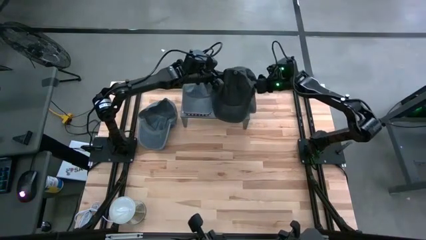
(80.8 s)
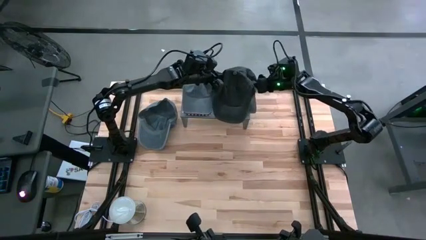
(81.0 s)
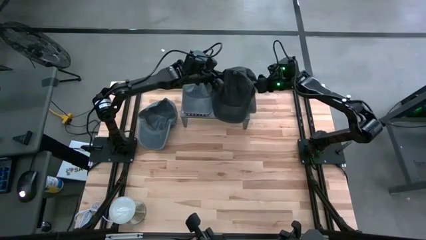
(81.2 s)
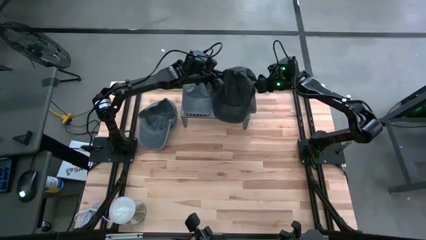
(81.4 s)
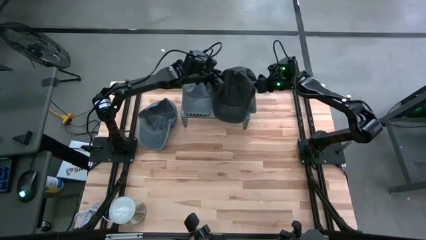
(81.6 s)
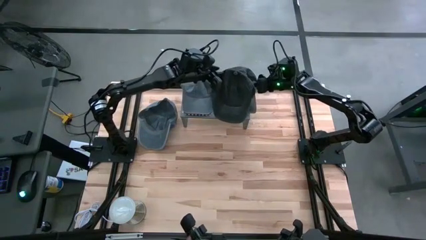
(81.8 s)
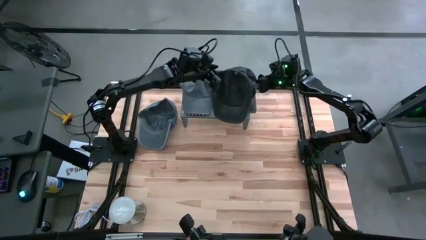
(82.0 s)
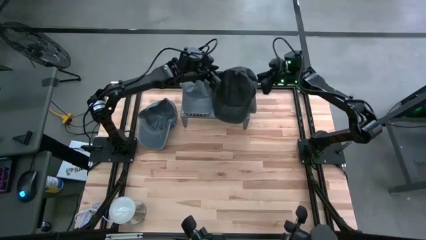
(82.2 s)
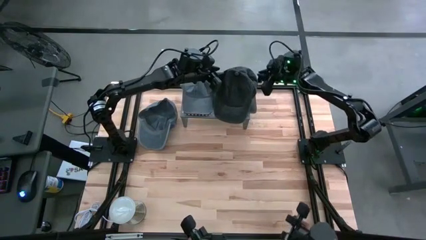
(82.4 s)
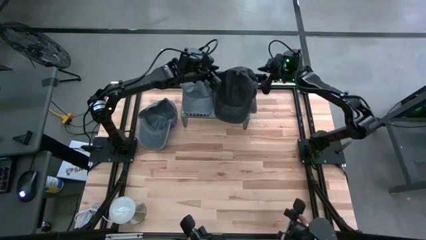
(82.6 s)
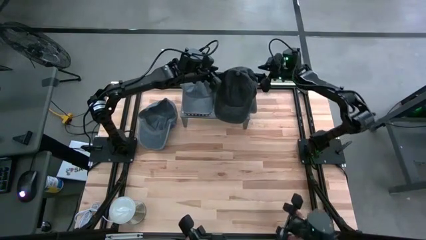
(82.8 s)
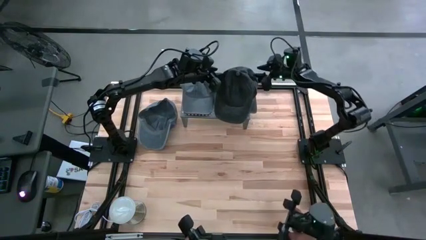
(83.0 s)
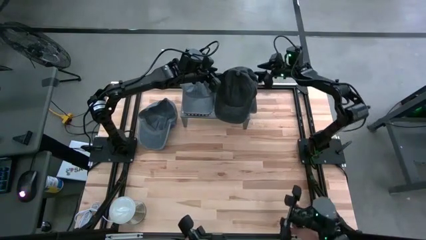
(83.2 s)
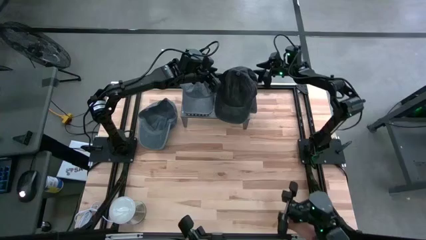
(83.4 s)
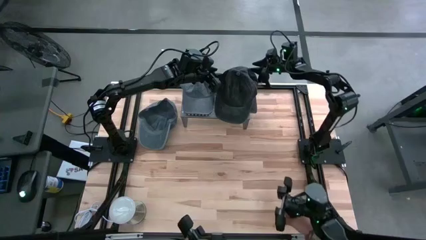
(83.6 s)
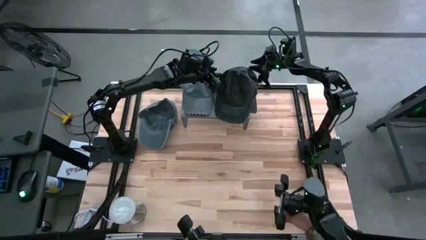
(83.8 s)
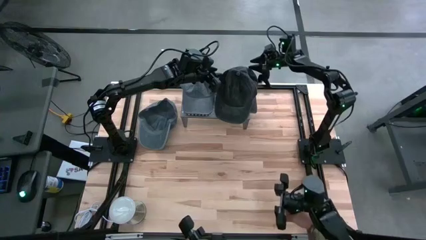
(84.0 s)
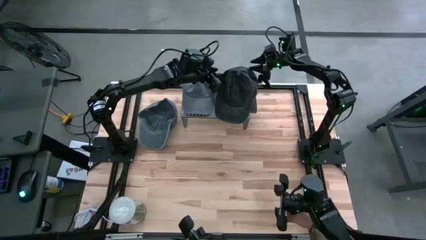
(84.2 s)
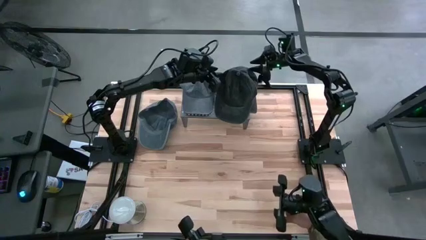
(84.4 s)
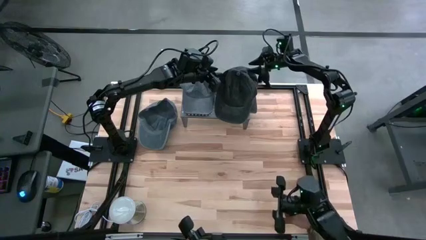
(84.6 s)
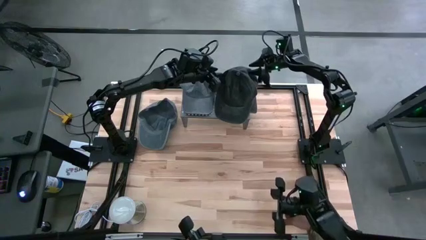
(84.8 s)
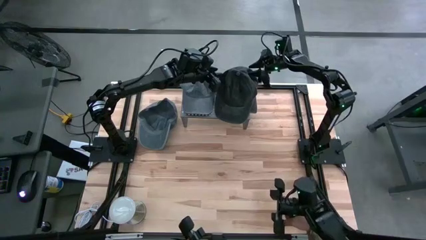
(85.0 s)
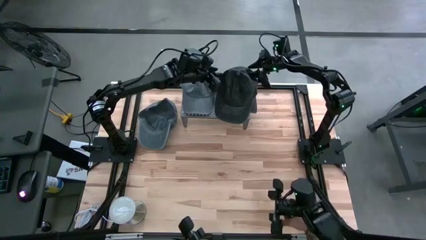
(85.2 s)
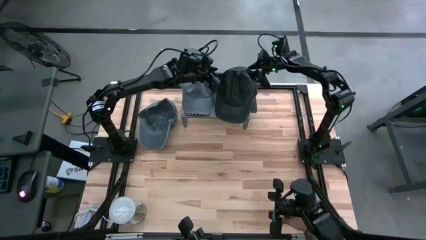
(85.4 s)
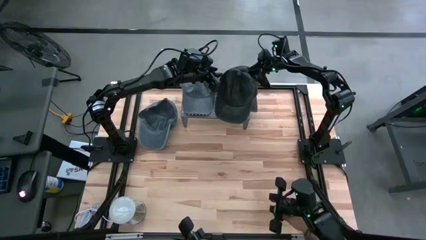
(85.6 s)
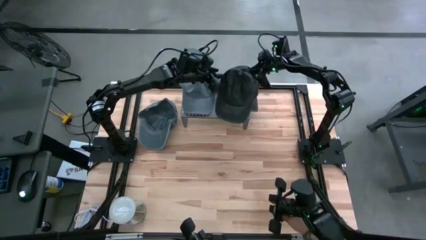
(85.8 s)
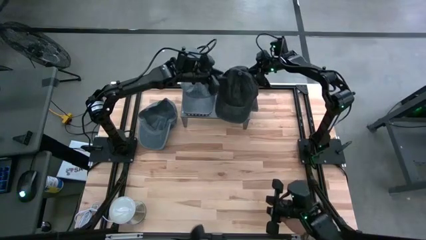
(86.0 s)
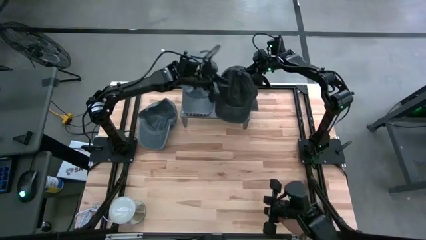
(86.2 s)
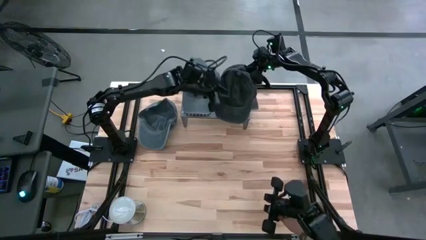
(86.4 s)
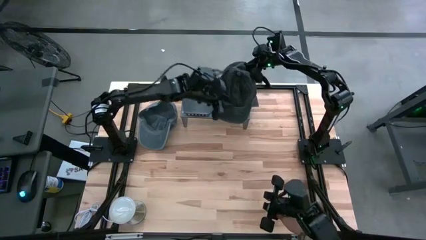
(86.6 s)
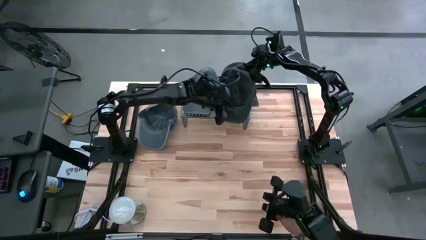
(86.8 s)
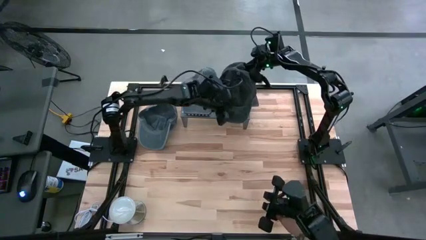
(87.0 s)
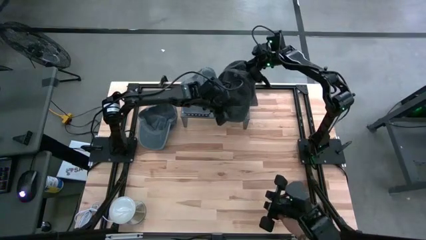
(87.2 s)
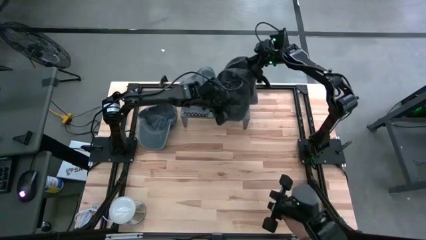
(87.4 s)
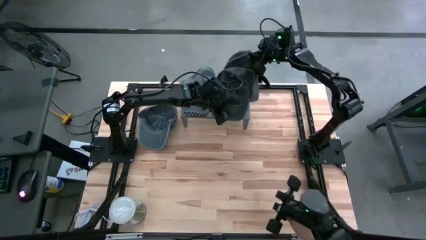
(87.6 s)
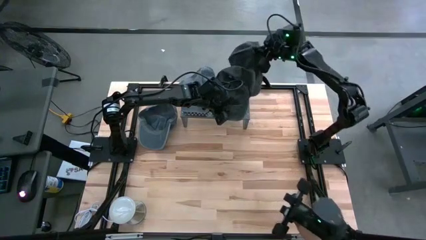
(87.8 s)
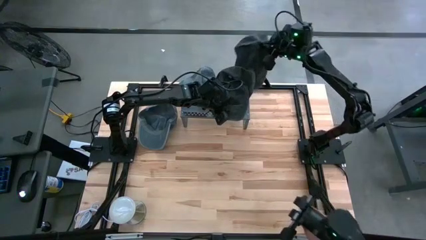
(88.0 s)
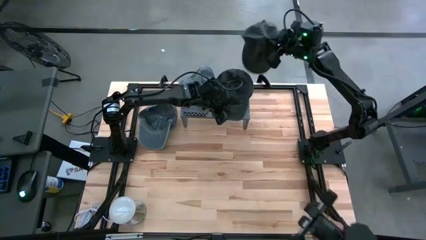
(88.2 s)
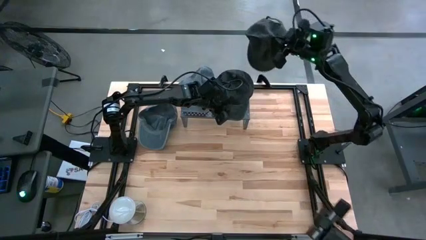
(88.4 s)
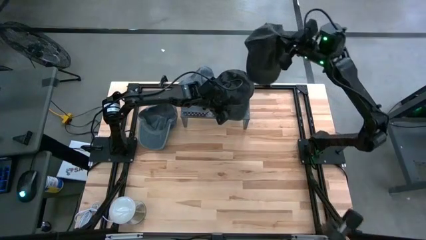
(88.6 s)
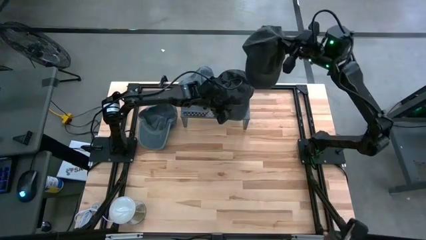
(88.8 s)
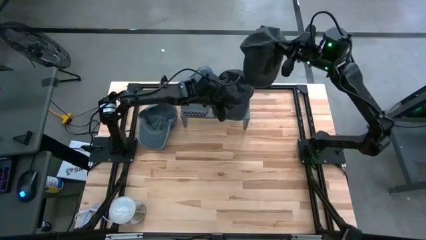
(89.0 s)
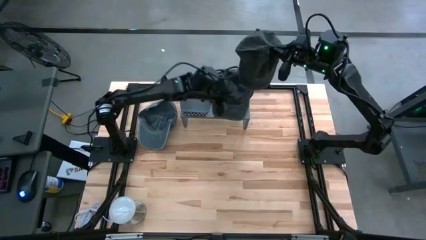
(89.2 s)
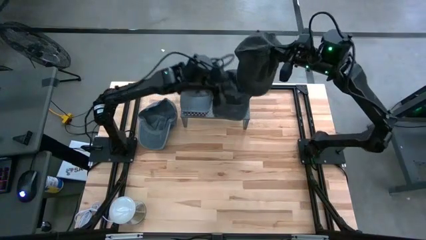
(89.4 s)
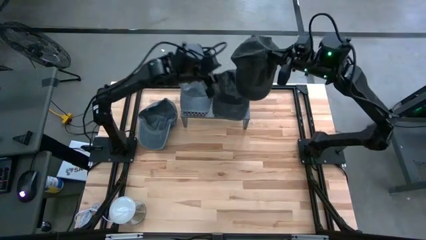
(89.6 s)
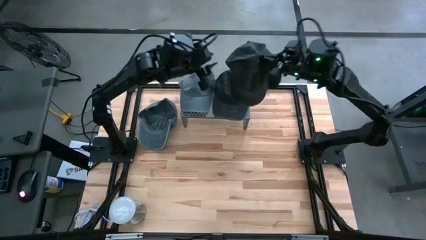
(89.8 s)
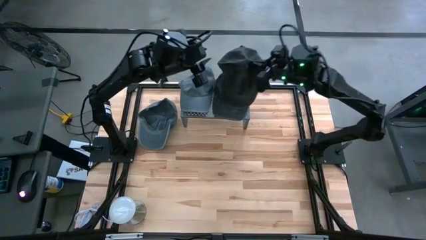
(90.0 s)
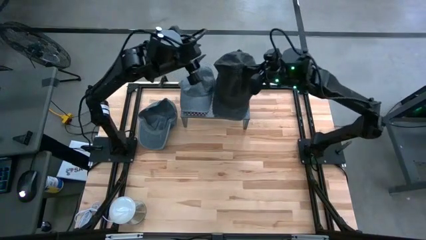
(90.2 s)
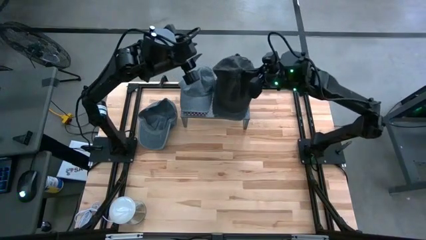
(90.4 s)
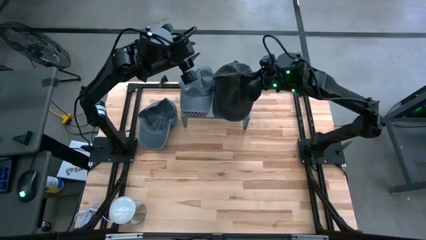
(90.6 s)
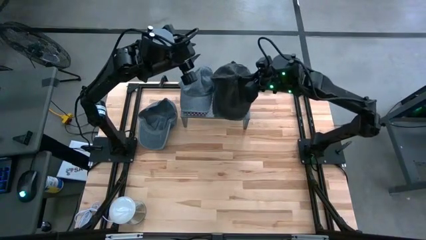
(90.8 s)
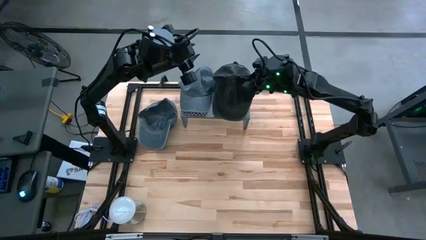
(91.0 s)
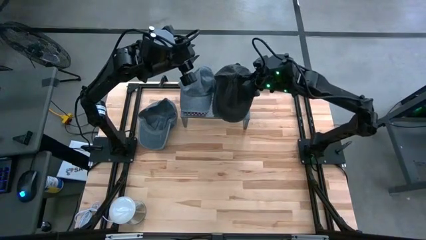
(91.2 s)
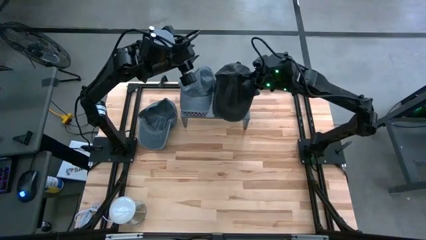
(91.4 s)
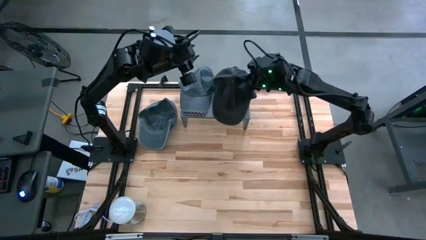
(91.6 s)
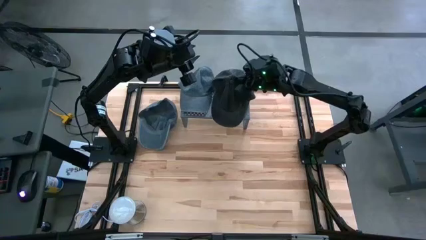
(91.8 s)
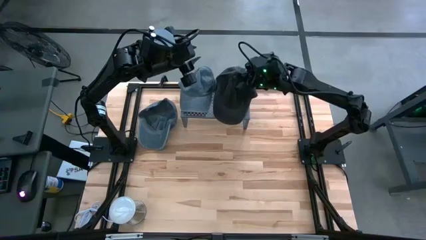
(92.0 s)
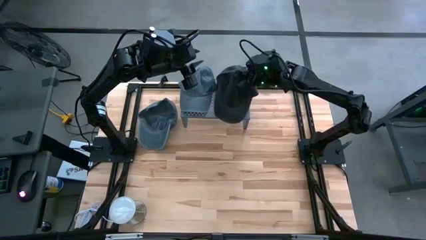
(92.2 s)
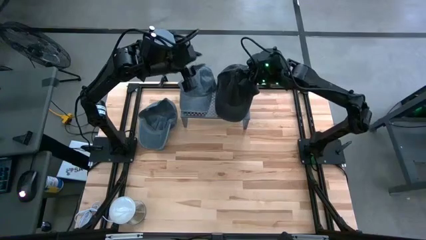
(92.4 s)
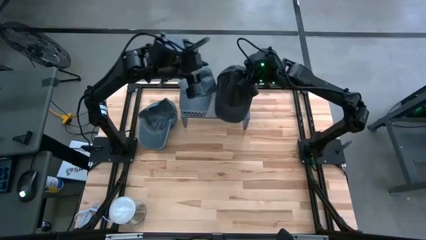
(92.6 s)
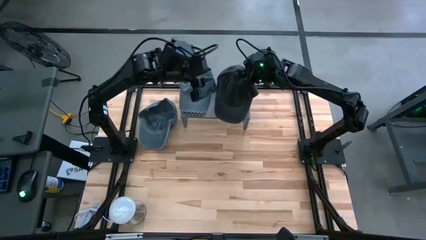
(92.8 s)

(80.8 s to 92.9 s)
Task: Pick & Place hat
Adjust the black cap on the shelf

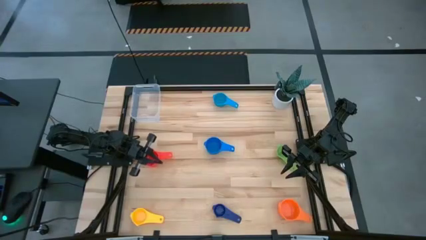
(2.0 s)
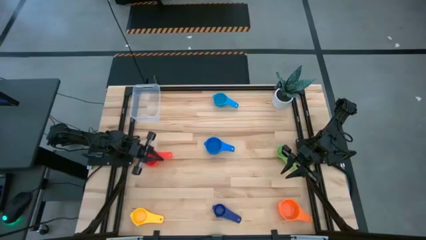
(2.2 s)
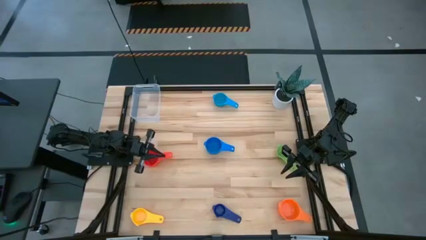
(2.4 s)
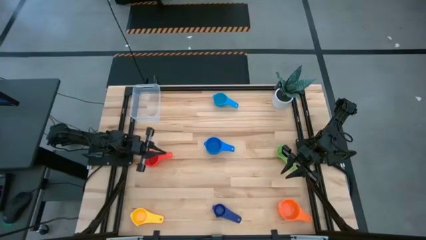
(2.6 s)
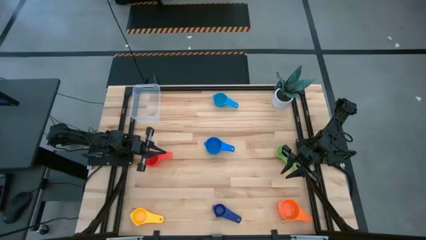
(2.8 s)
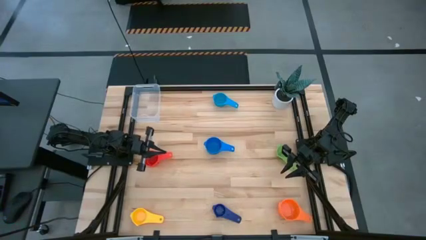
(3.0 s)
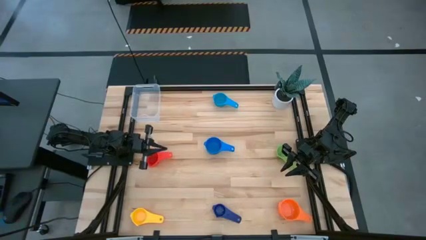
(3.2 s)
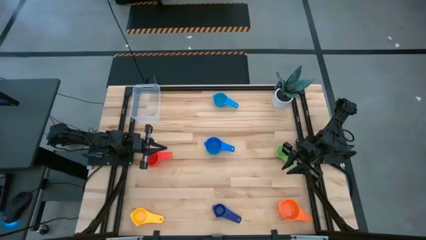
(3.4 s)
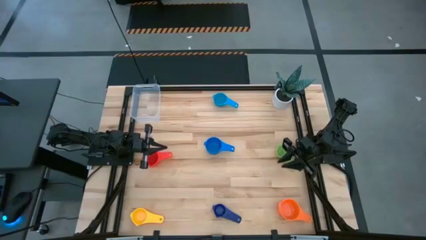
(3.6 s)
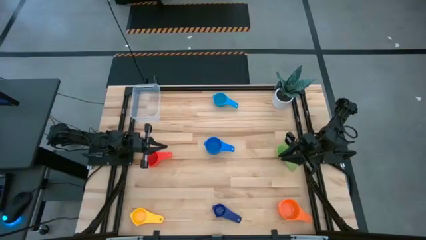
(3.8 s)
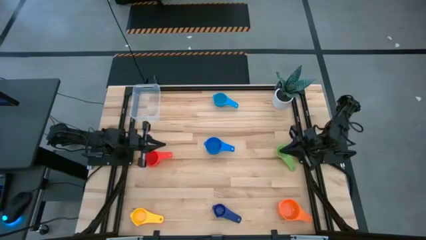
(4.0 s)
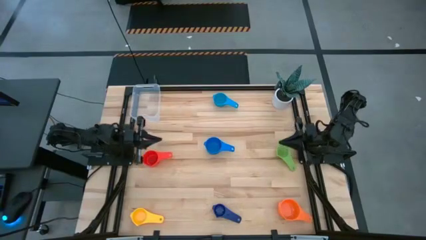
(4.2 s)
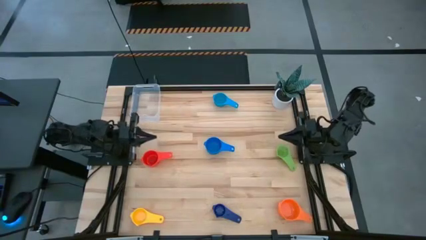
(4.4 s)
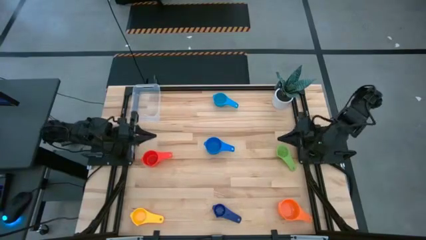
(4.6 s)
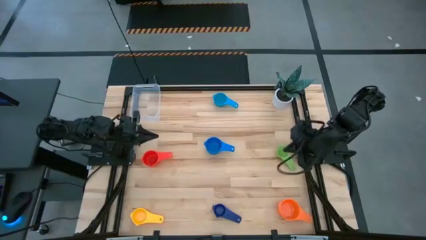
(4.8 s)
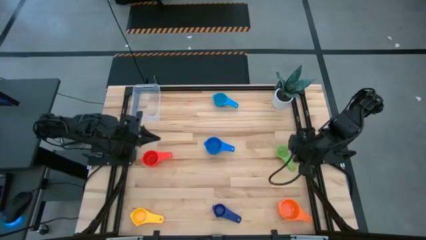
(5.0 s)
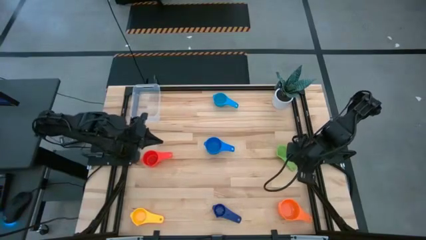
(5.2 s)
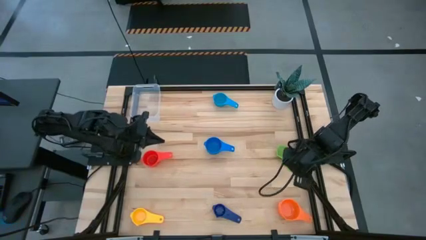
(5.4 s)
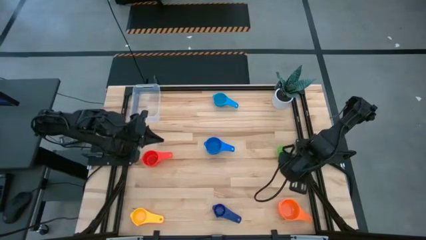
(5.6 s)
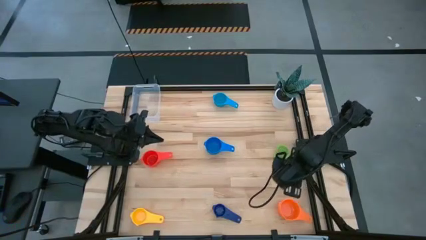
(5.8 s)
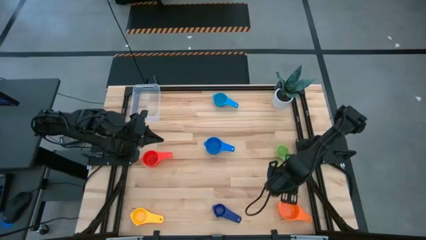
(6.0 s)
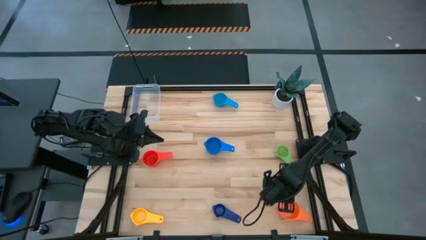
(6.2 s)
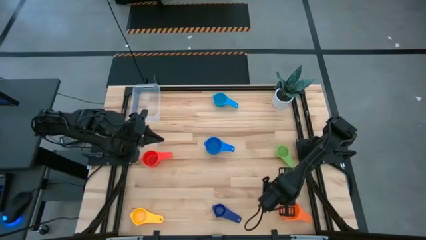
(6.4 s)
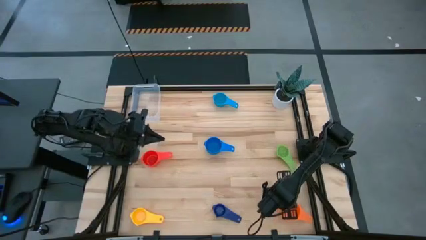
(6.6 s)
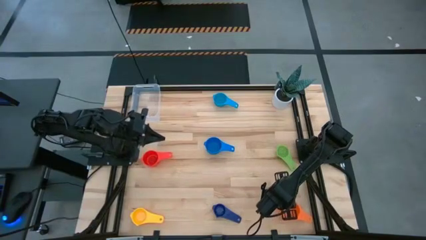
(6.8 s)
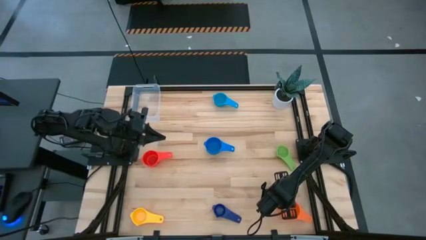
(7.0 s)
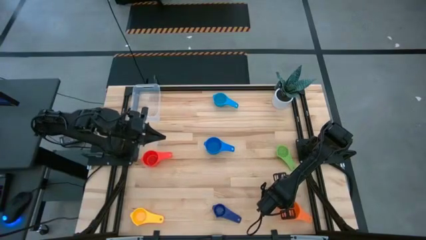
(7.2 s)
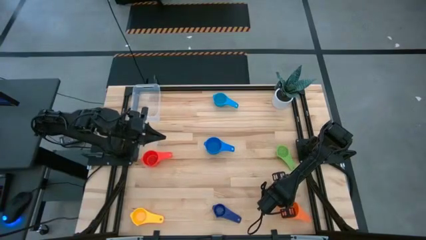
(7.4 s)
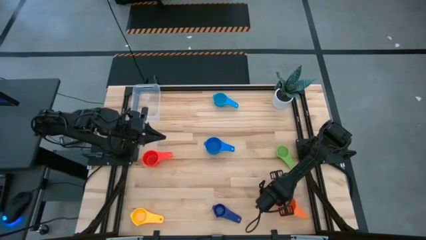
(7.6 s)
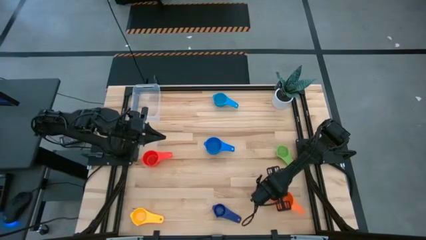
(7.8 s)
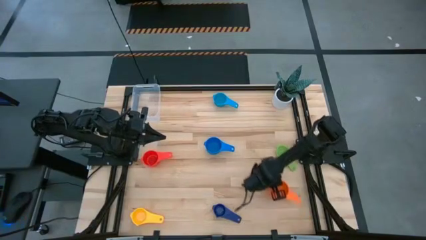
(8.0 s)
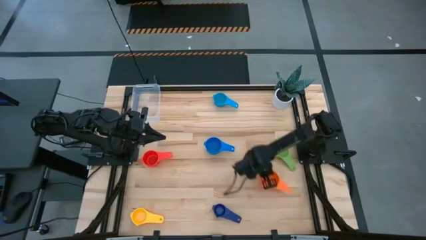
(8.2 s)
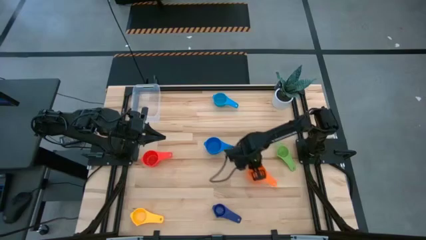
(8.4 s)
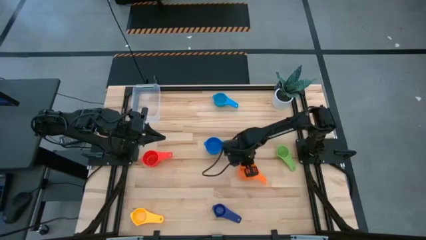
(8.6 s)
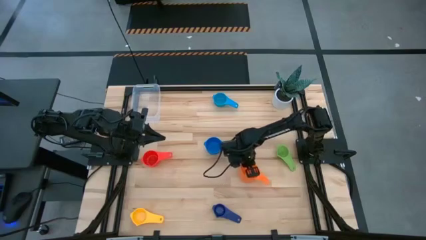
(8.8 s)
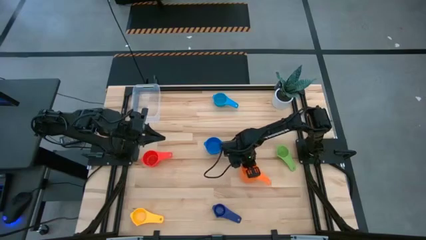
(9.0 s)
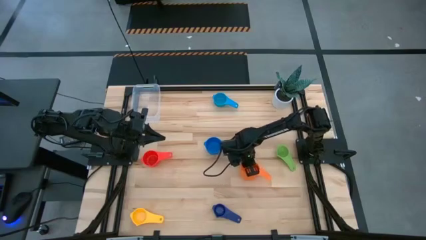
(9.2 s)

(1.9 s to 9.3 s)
Task: Nest measuring cups in basket
Move the orange measuring cup to the middle right
